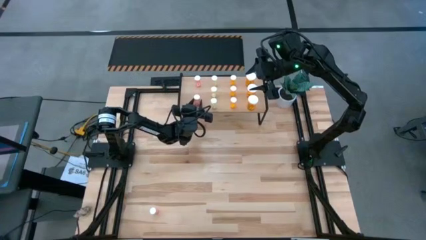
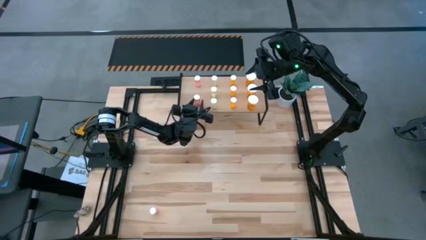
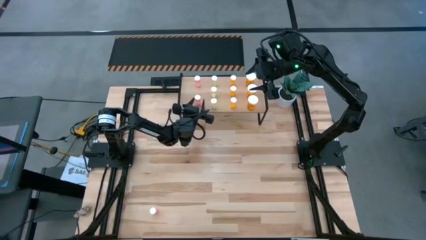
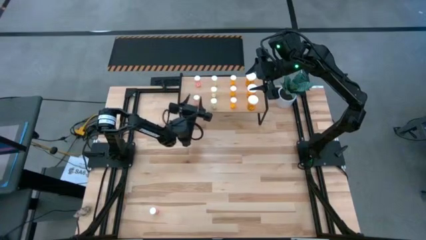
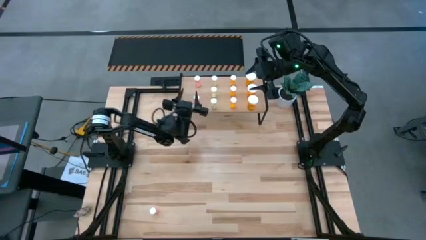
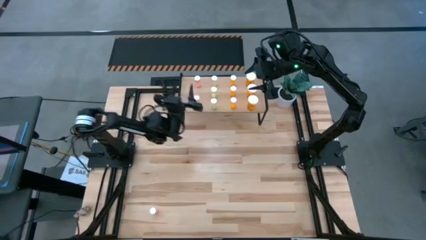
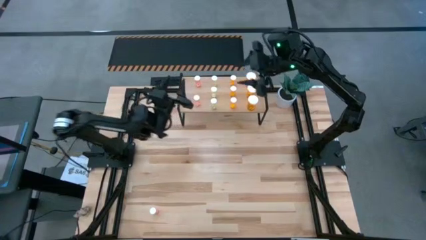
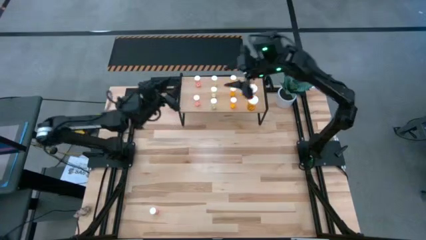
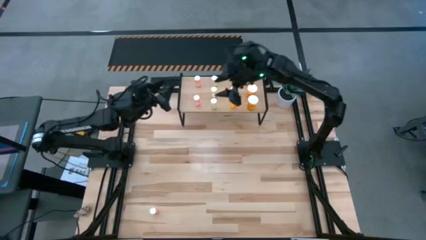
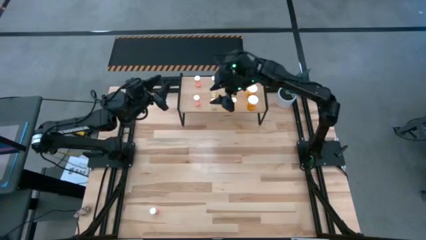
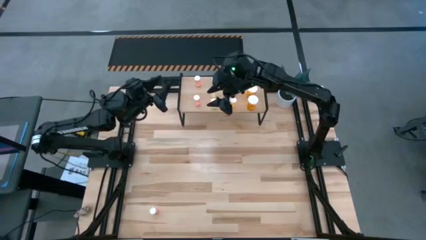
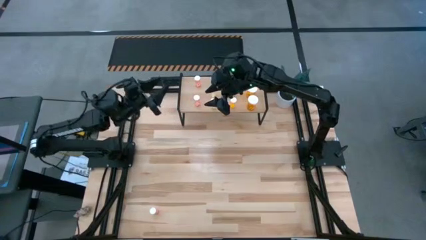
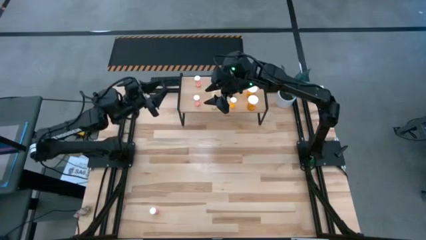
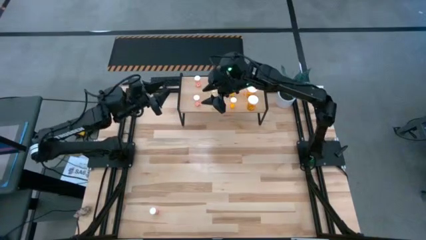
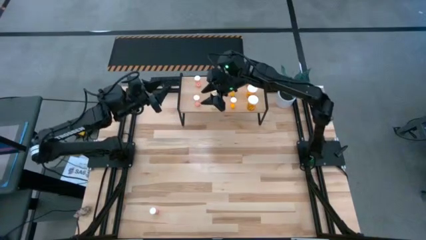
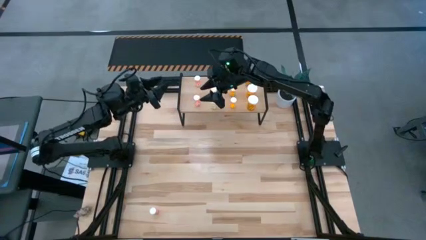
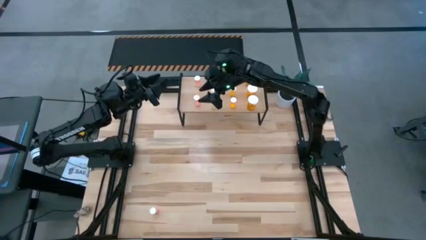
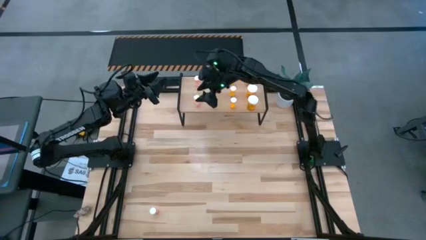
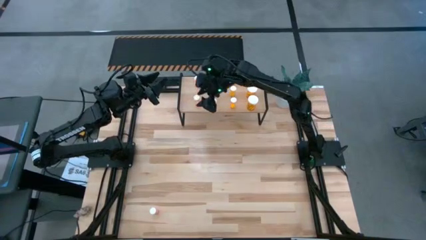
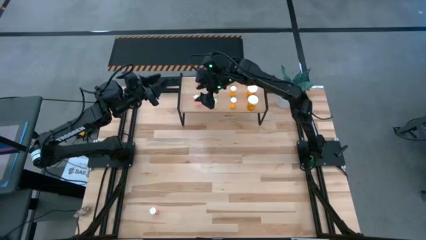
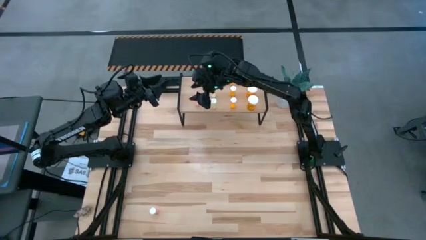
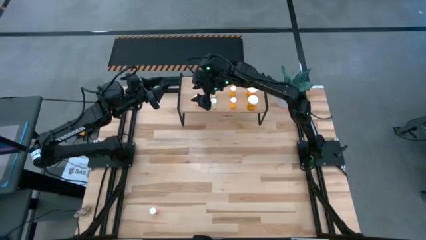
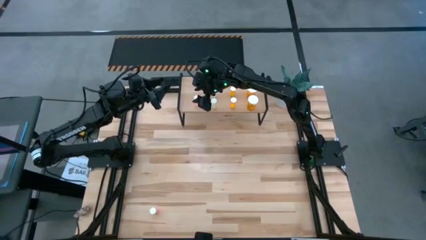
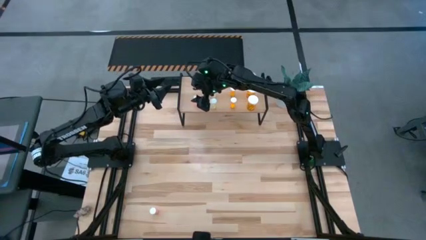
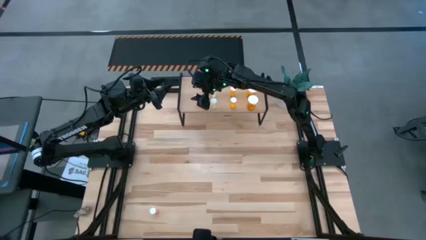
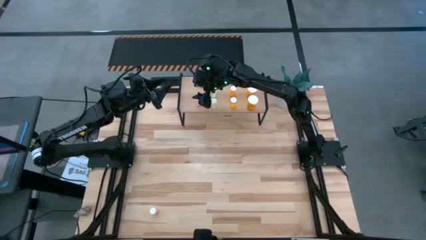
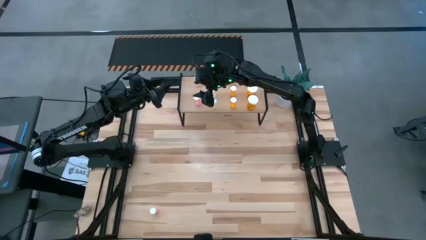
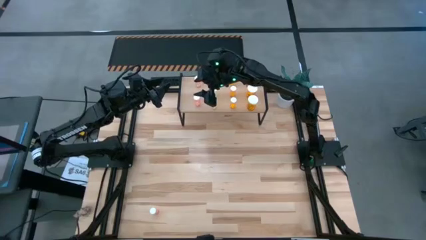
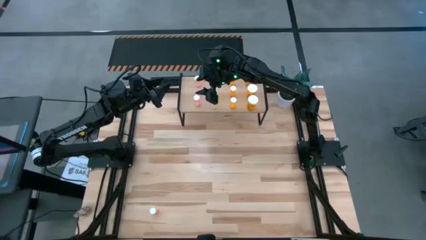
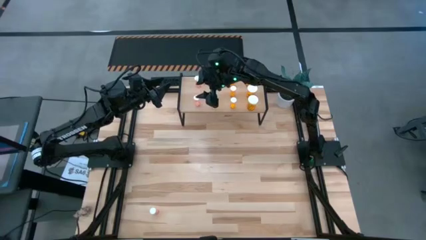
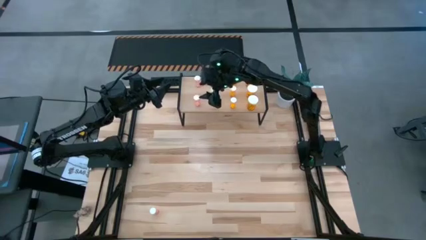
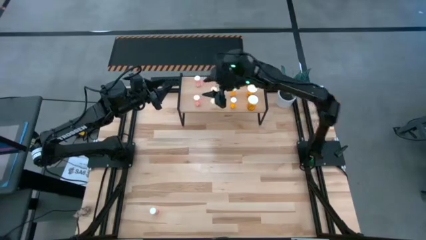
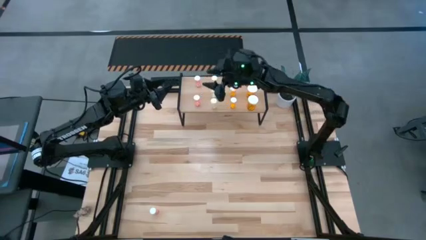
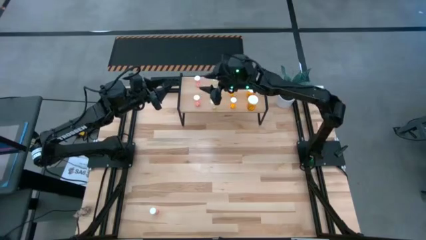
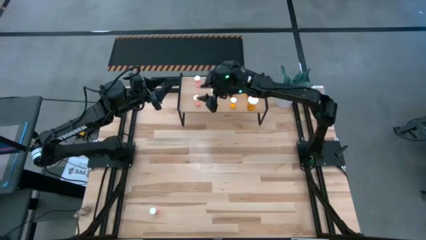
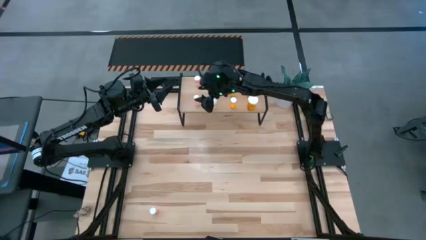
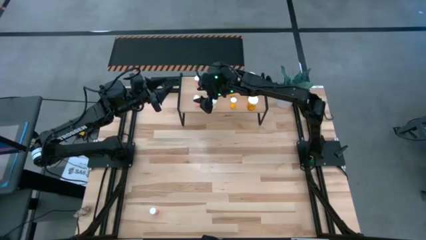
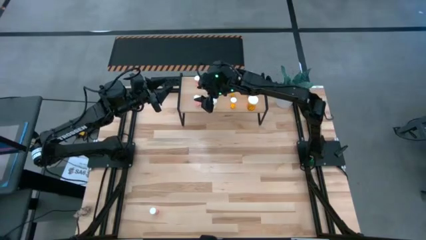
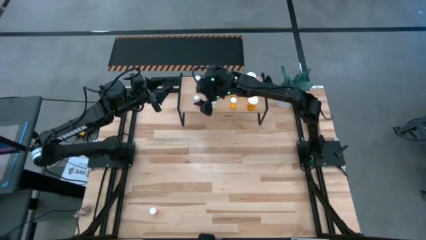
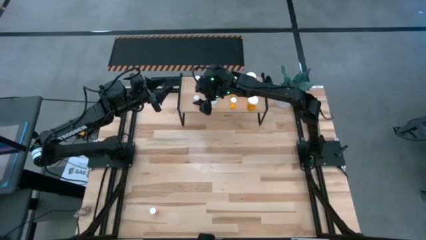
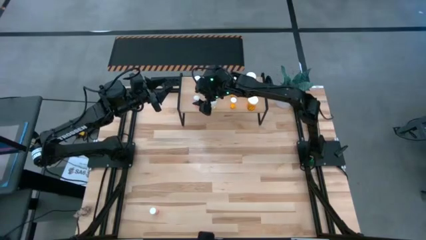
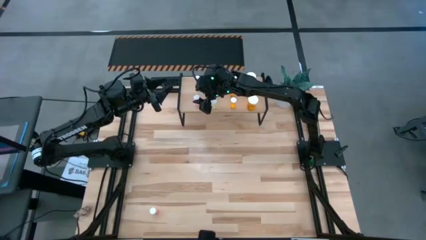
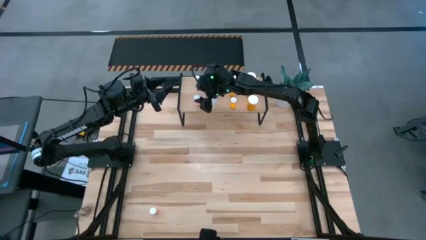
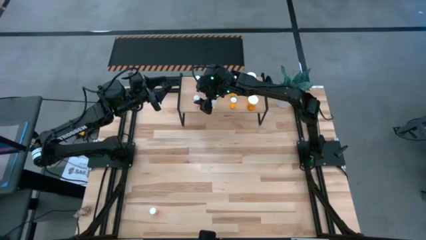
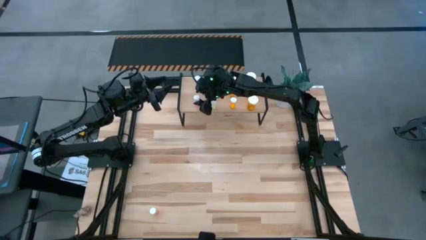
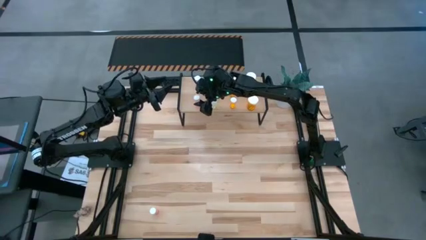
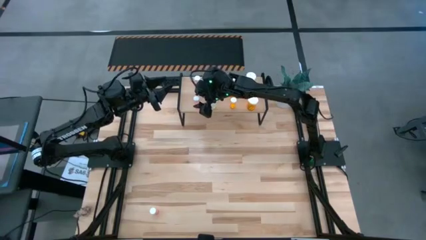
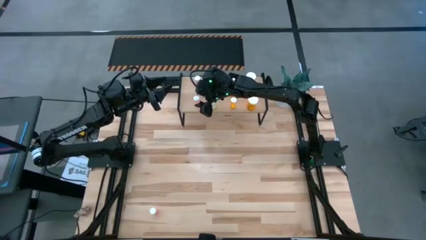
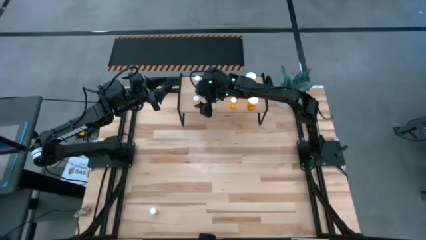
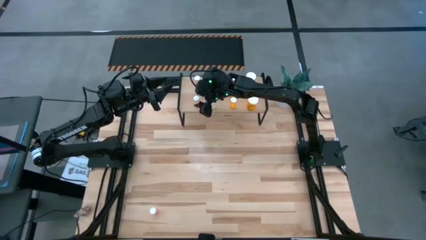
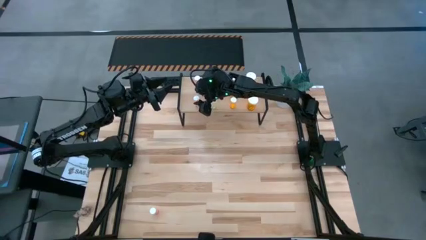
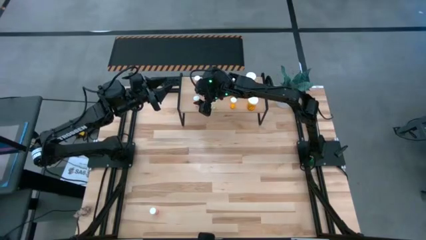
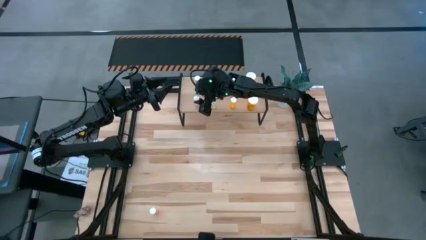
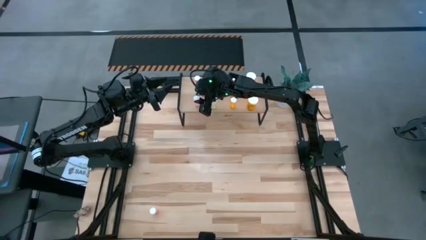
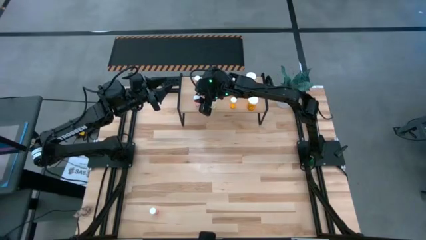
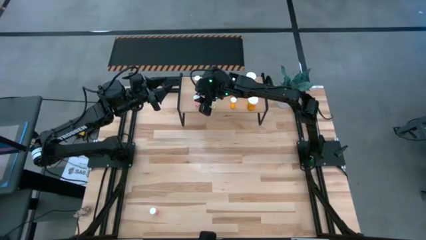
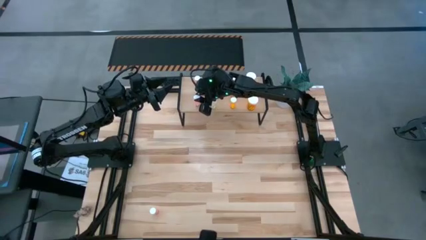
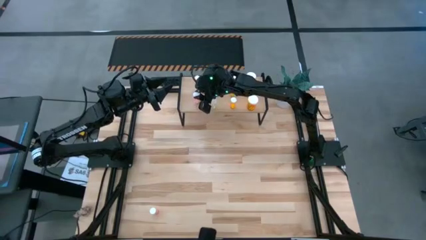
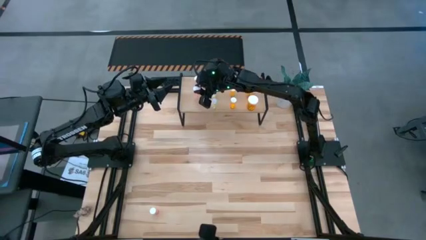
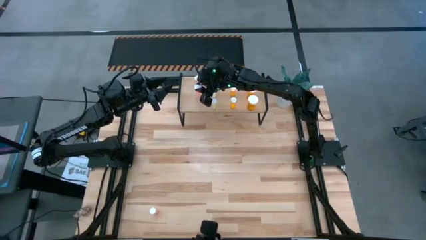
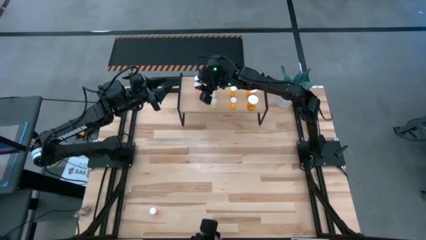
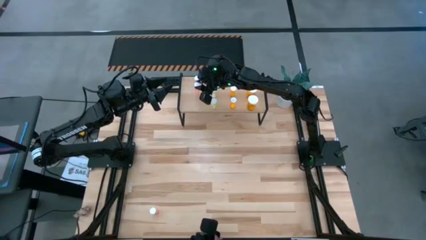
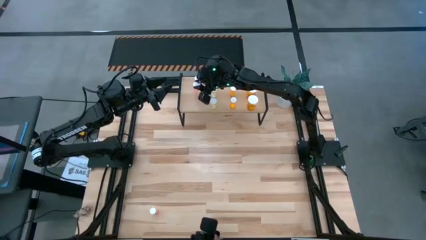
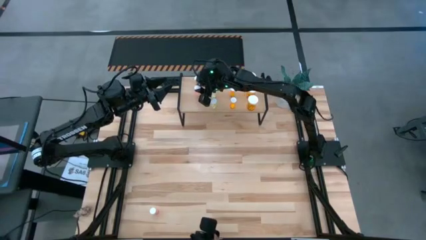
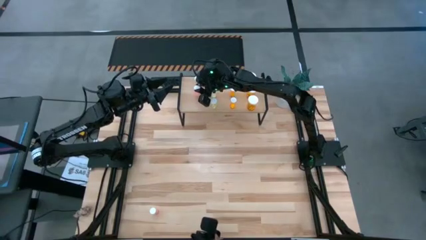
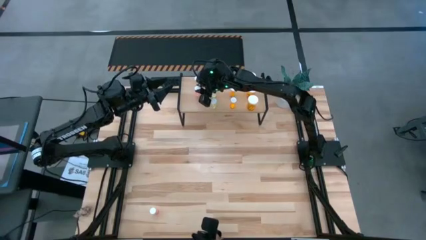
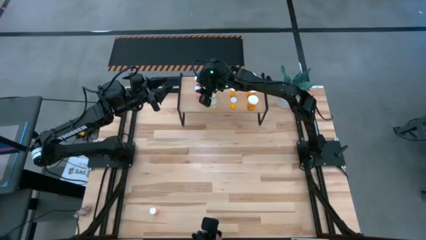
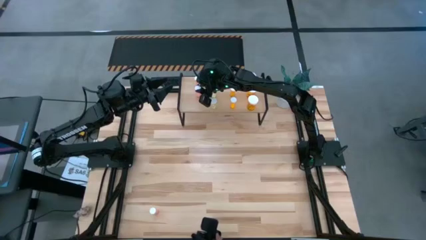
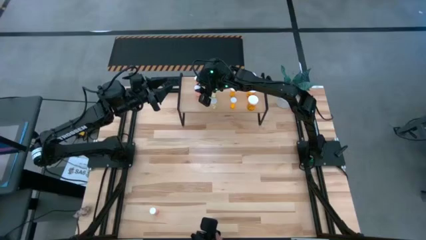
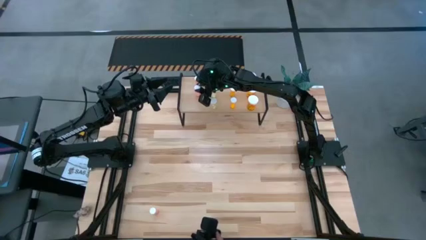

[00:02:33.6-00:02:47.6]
Task: Pick and place medicine bottles onto shelf by color
Put the right pink pill bottle on the shelf aligned with the other small pink pill bottle

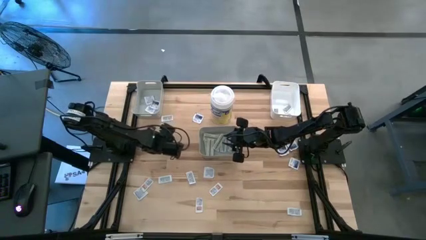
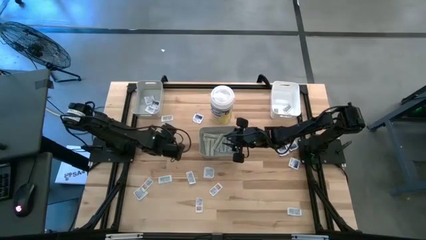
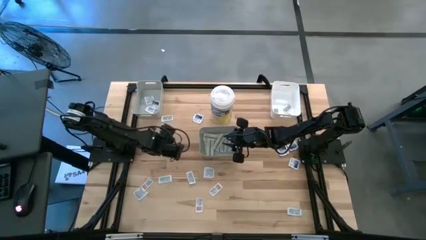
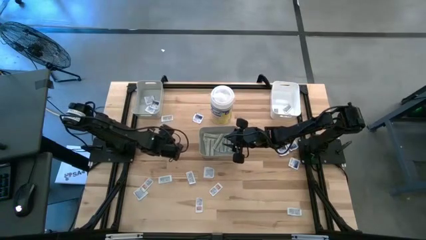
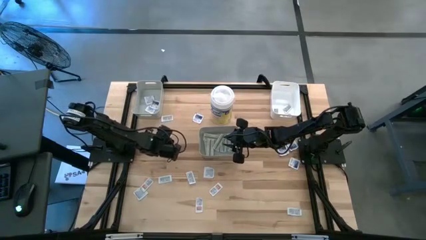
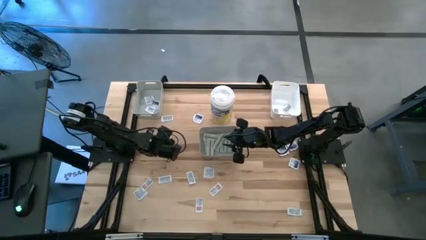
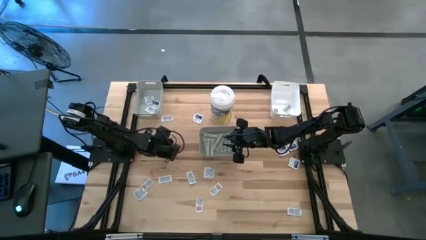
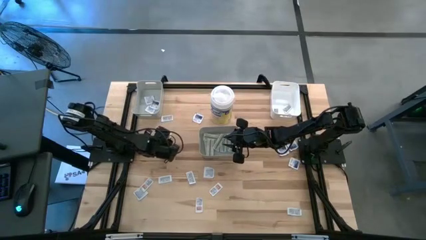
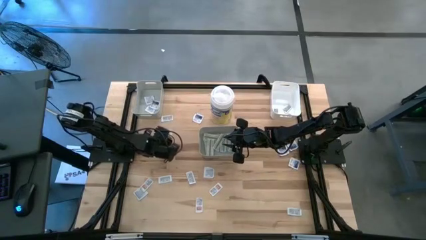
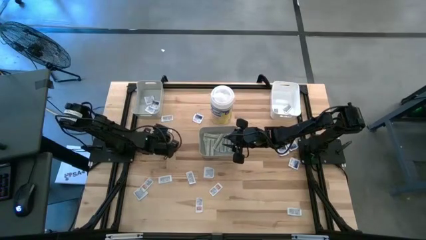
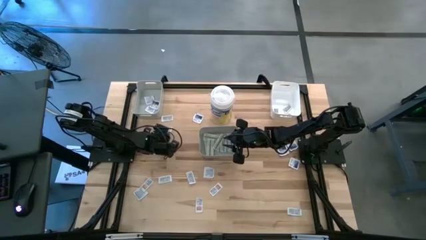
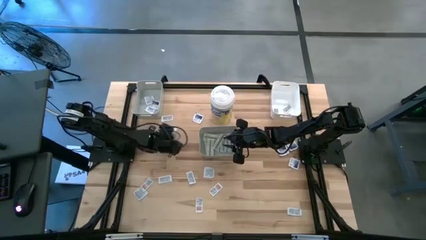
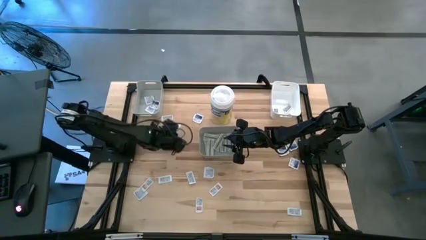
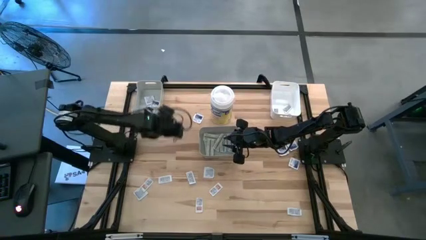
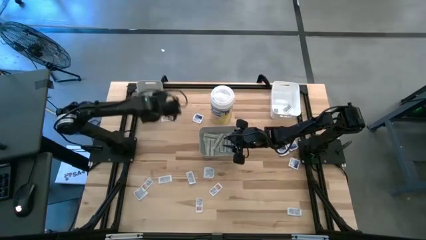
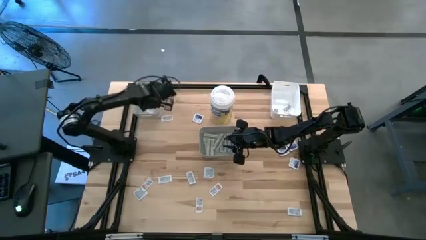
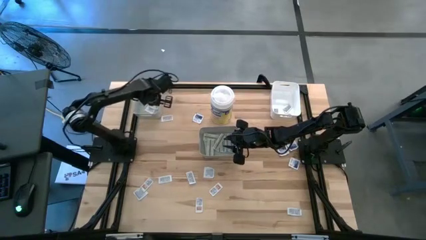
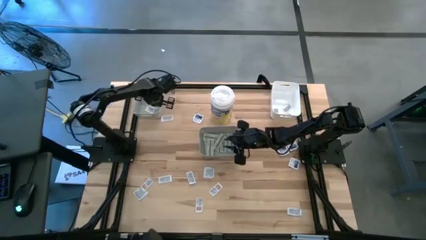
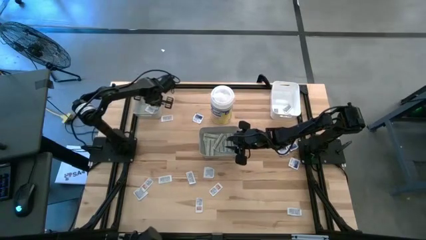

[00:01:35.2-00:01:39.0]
Task: Pick & Place First Aid Supplies
Put the alcohol pad into the top gray bin
